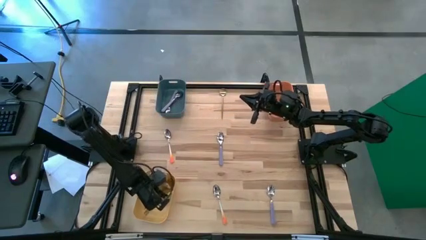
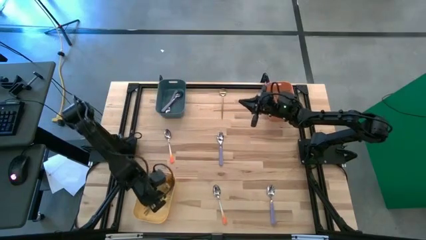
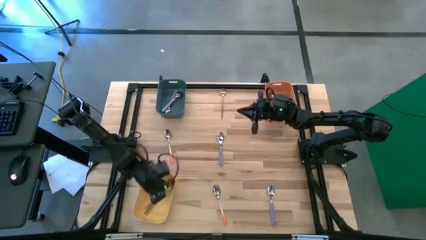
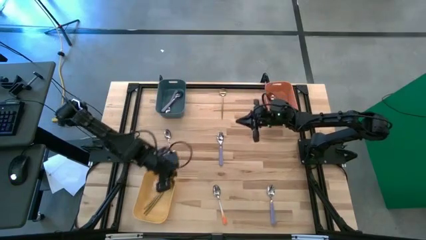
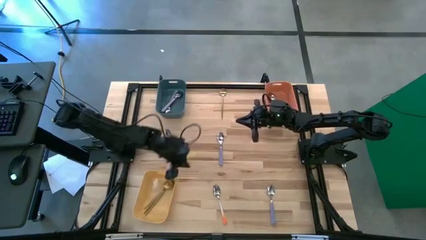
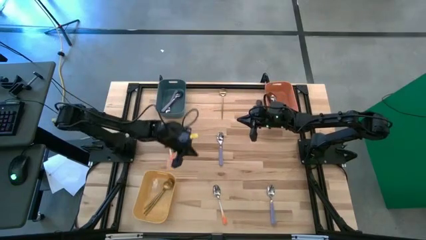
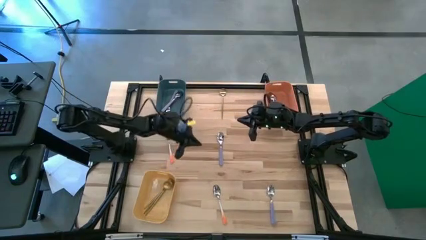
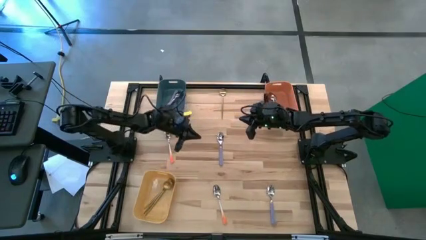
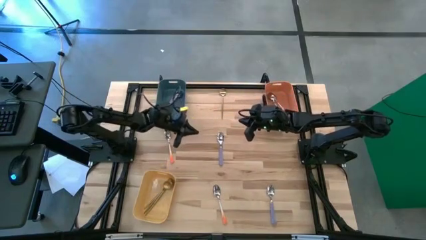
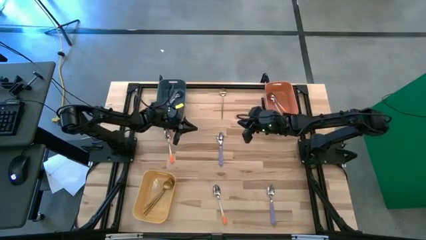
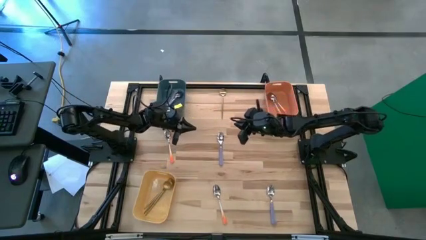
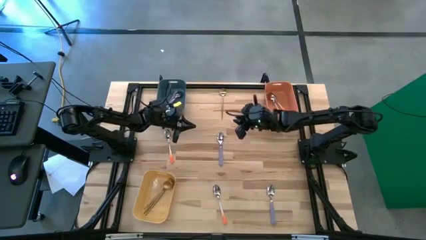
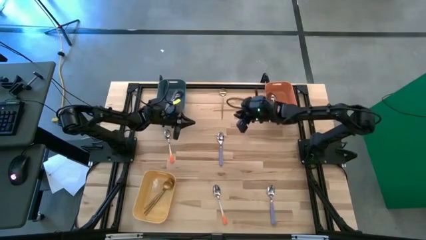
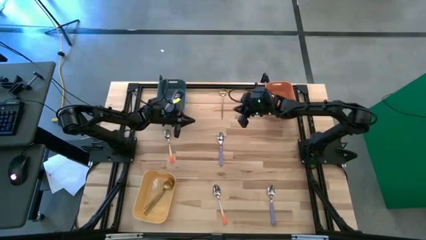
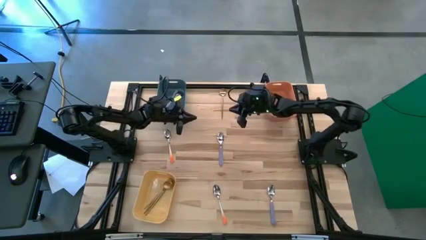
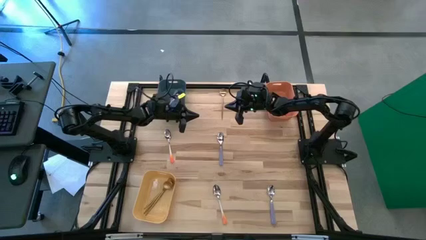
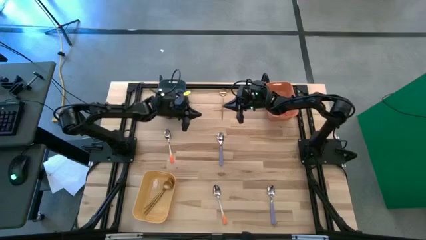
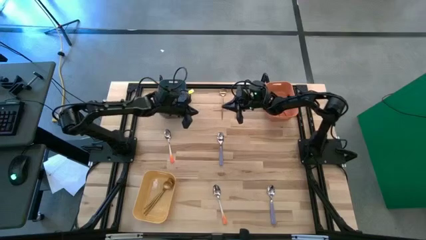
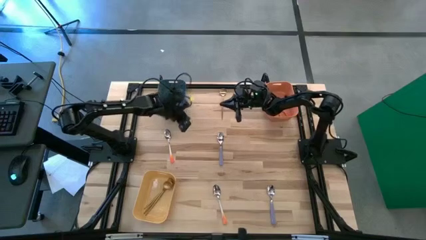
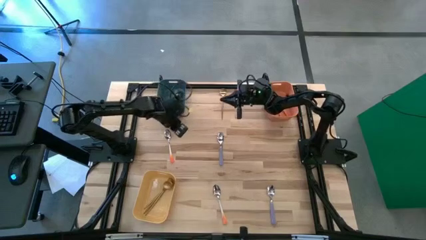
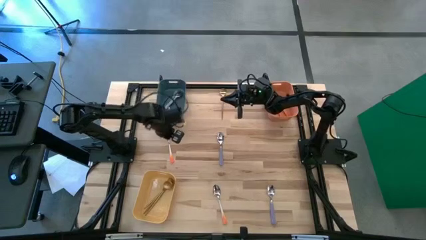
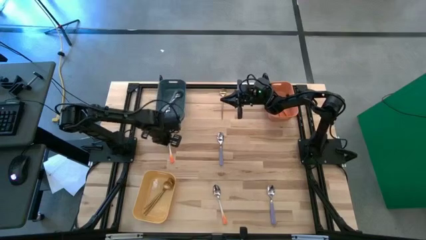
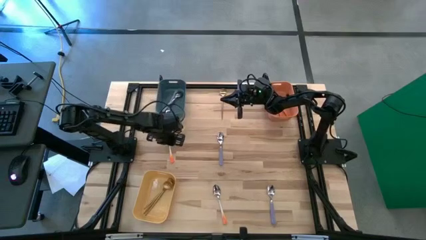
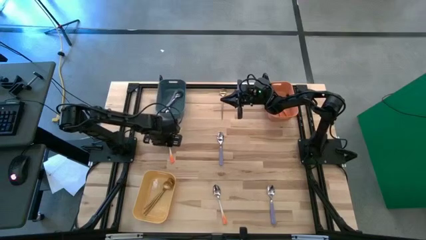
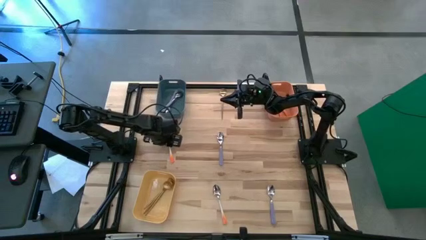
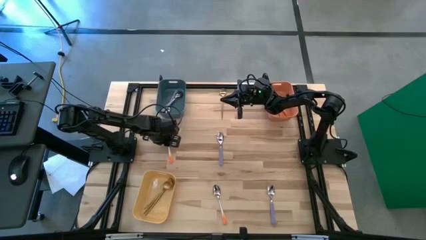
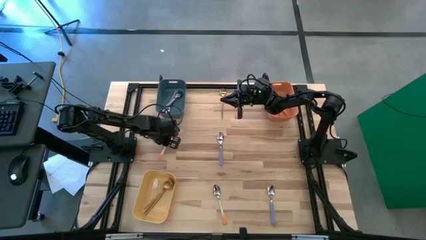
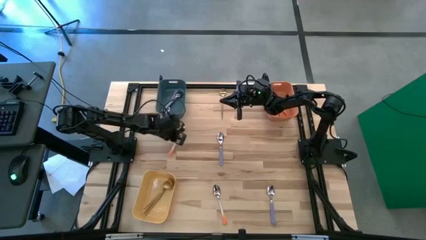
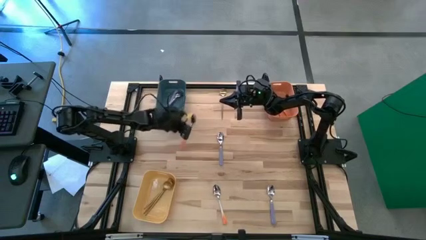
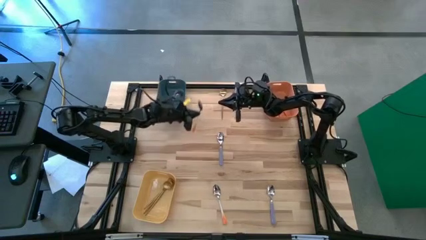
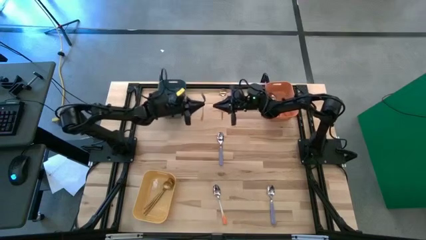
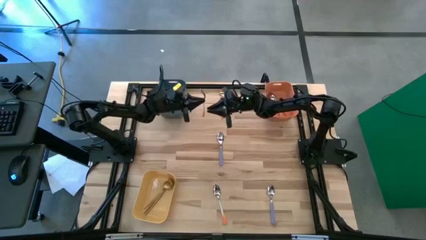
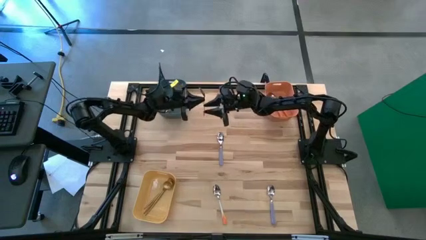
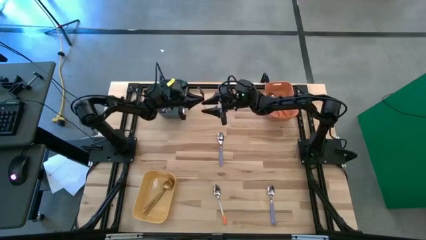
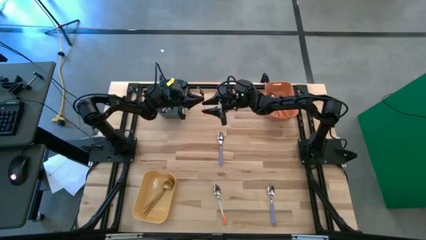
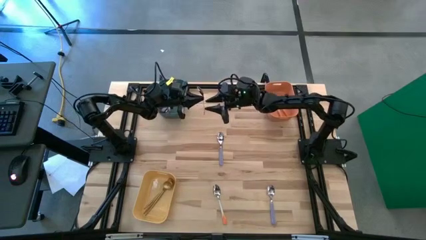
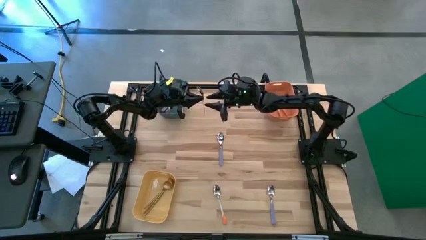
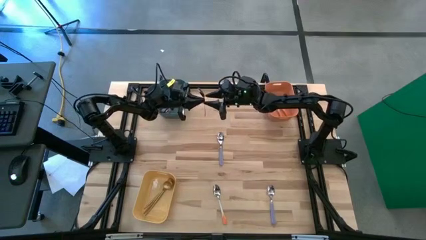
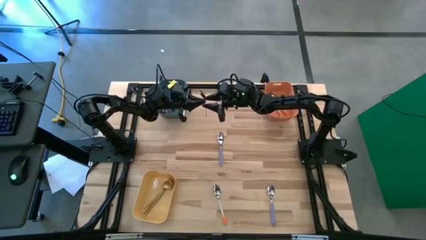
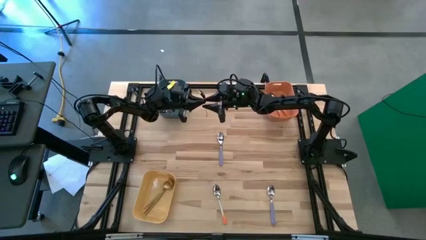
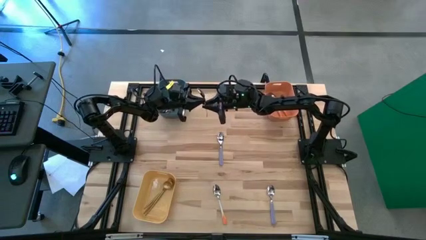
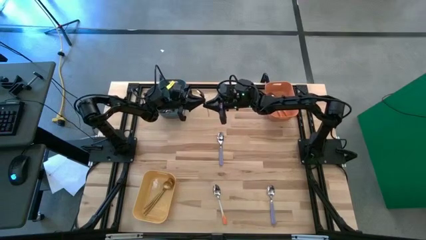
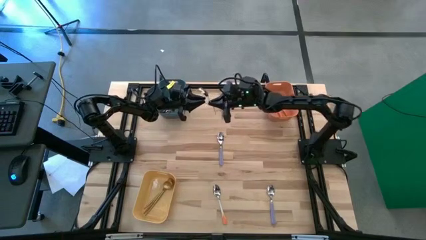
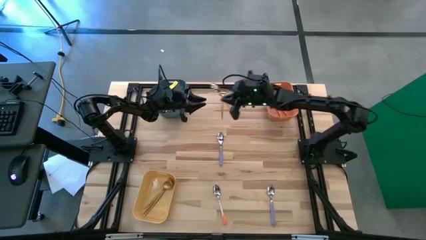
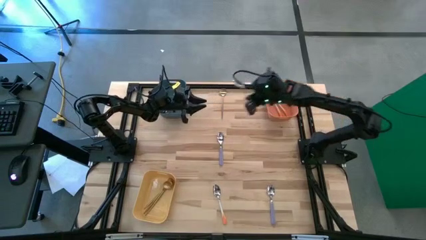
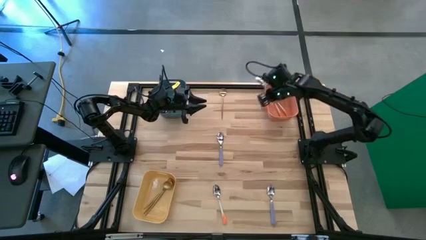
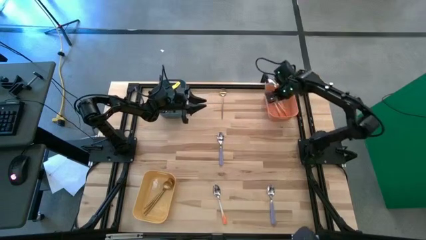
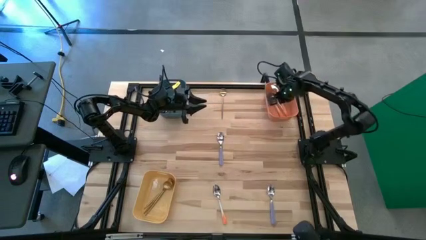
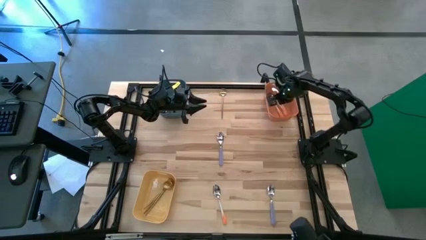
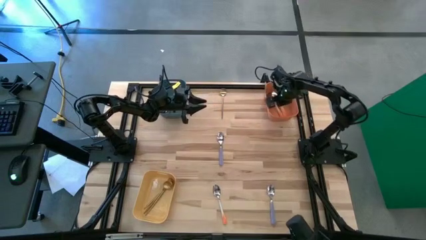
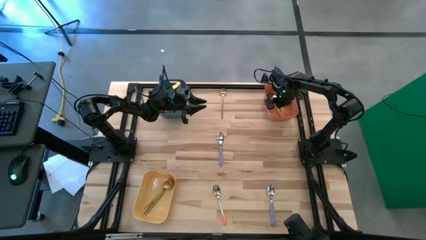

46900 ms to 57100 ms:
Task: Sort silverware by color (type)
Put the top orange spoon into the orange bin

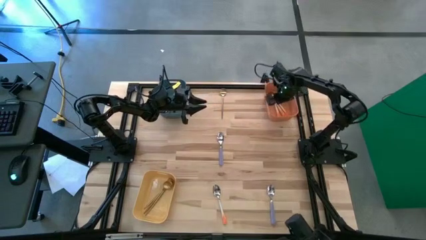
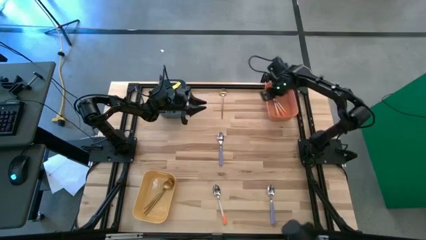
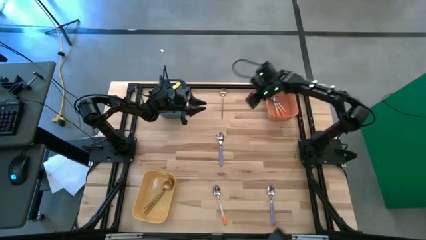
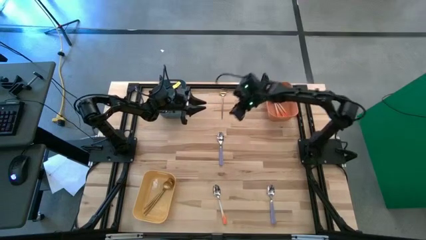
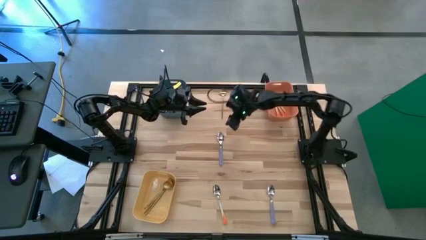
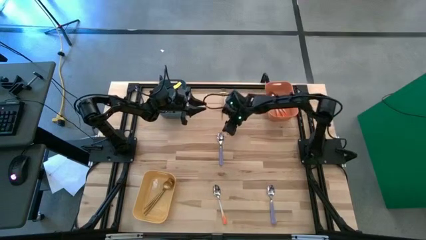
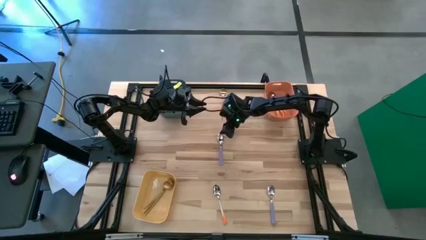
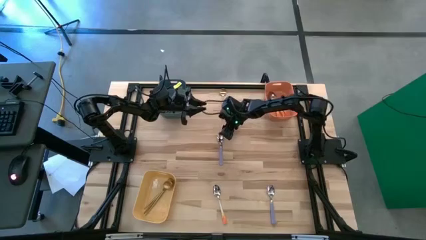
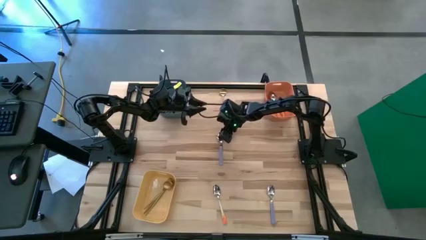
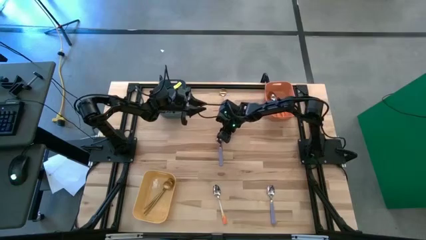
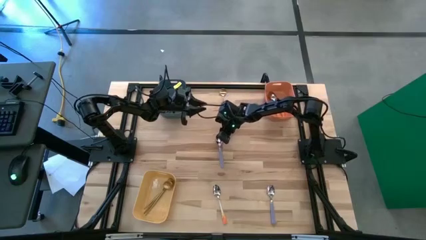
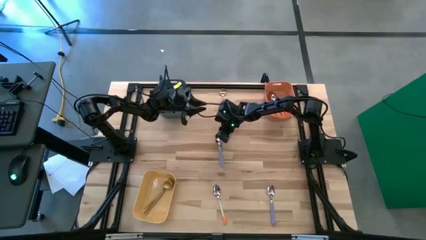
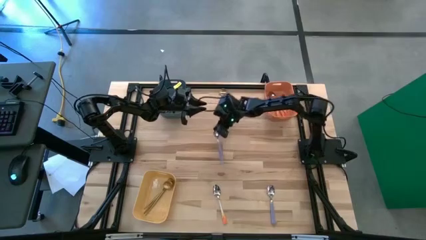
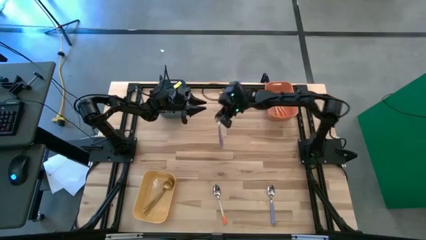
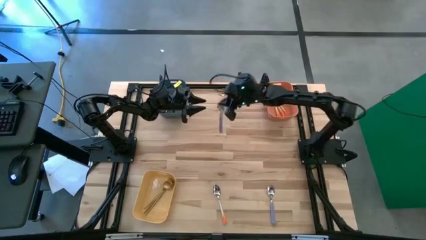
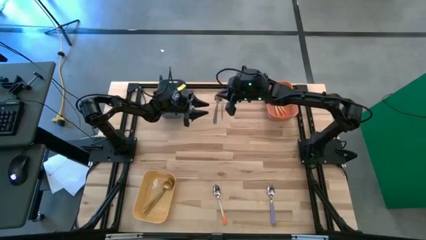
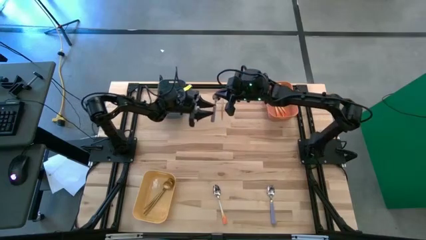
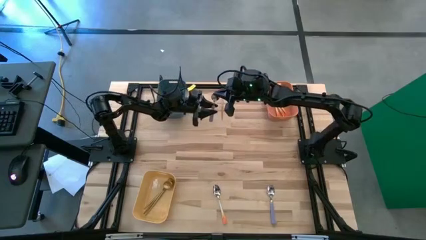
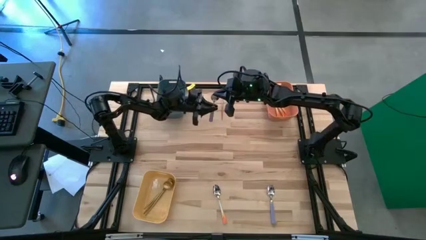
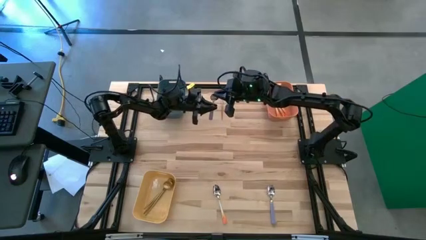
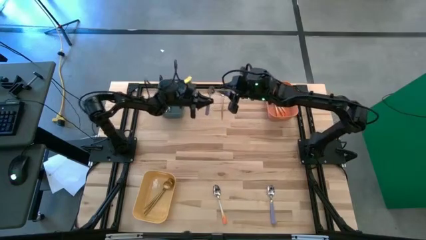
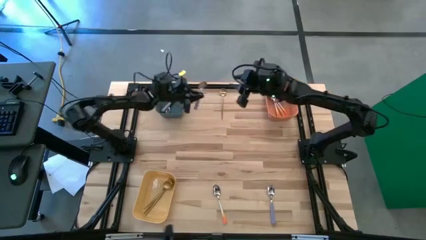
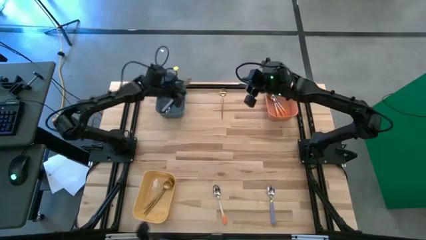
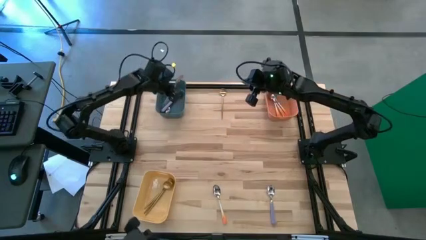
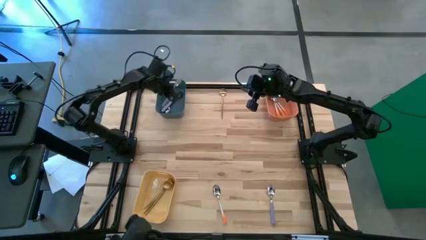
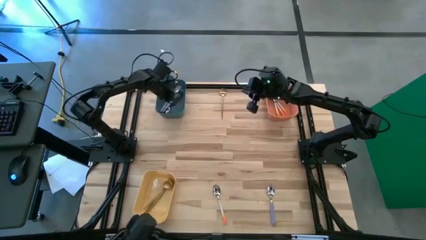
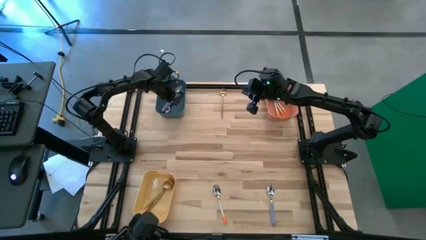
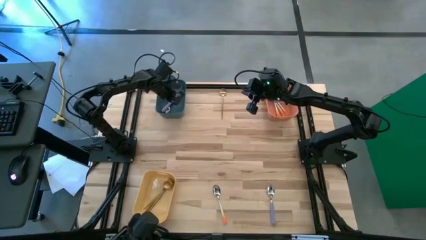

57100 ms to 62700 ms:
Put the top purple spoon into the blue bin
